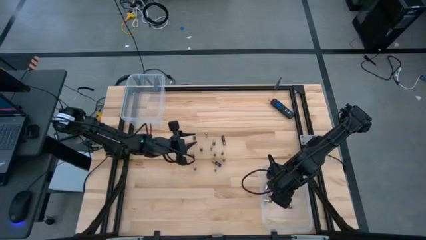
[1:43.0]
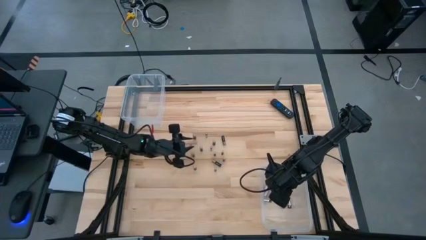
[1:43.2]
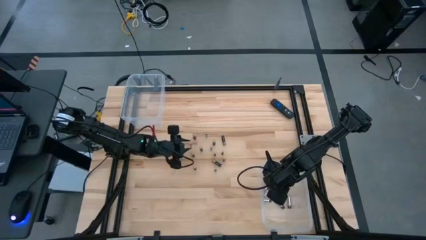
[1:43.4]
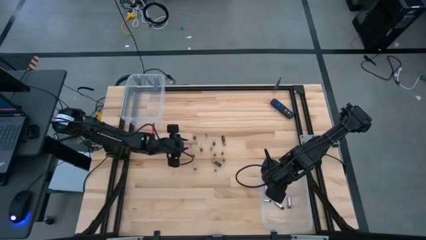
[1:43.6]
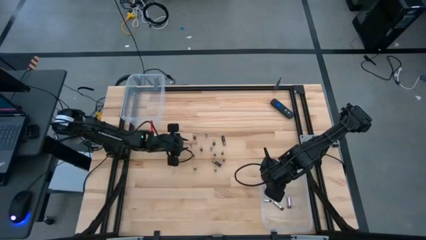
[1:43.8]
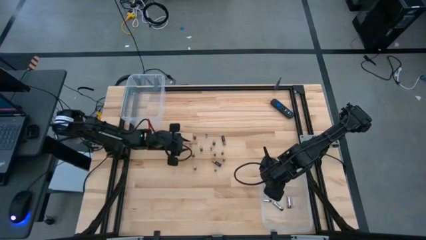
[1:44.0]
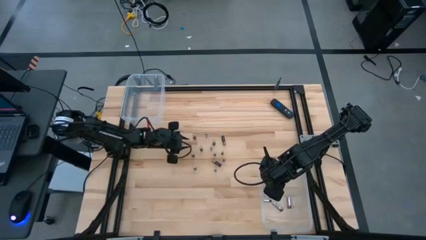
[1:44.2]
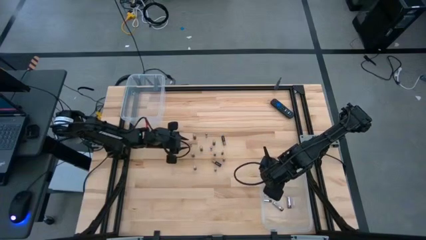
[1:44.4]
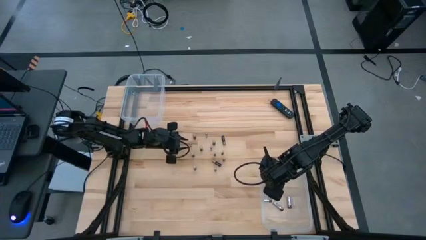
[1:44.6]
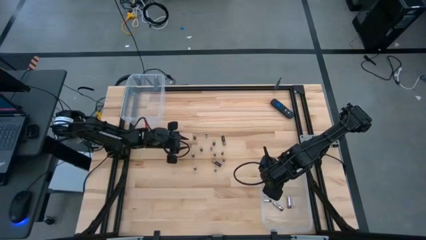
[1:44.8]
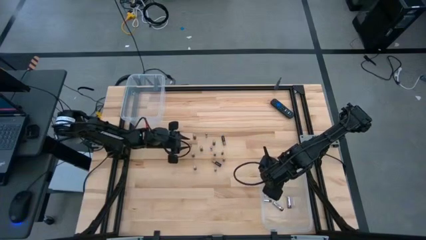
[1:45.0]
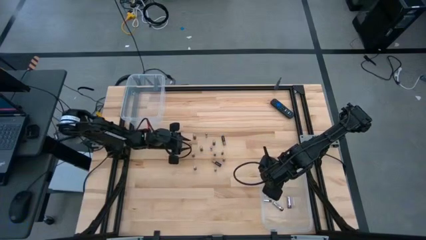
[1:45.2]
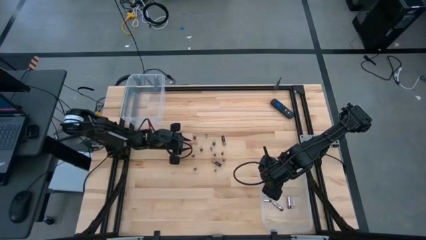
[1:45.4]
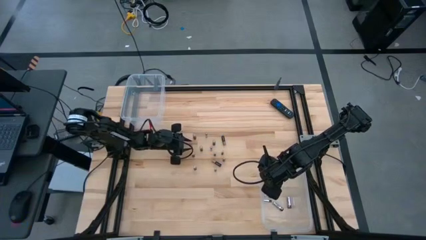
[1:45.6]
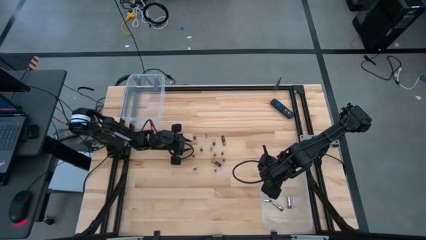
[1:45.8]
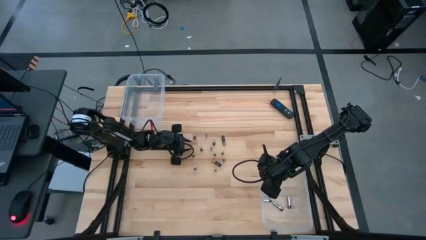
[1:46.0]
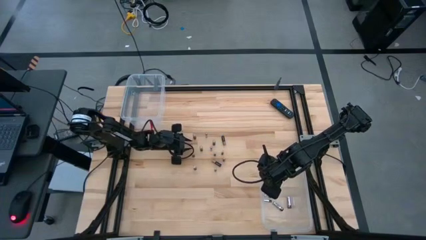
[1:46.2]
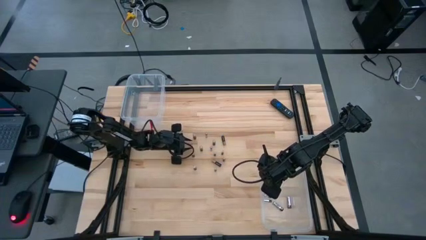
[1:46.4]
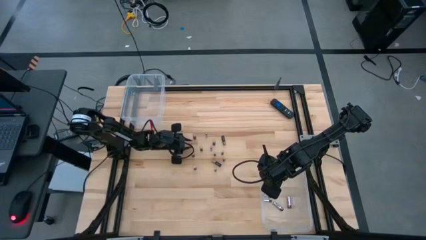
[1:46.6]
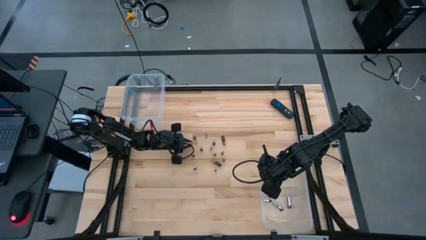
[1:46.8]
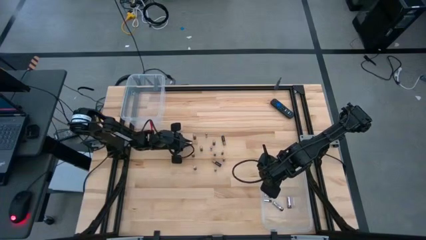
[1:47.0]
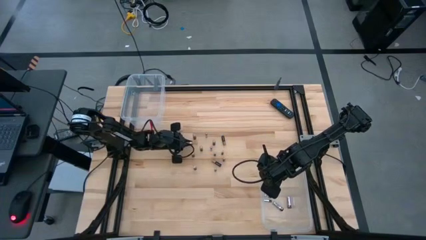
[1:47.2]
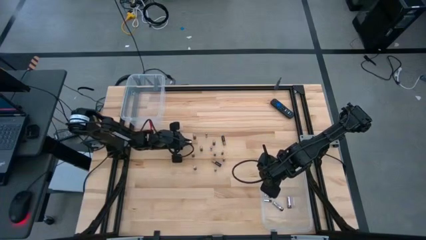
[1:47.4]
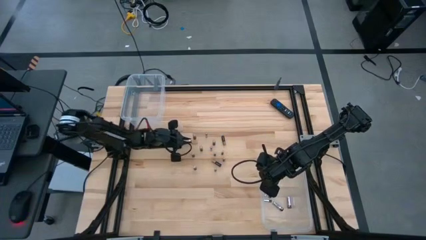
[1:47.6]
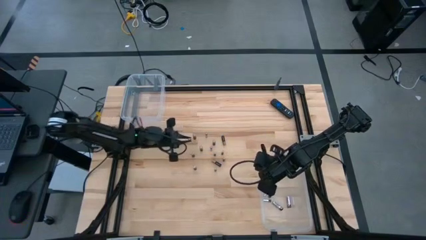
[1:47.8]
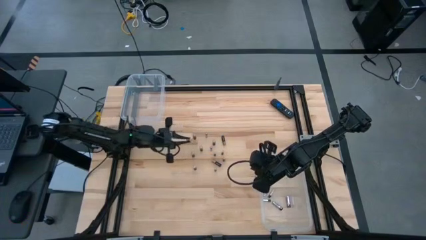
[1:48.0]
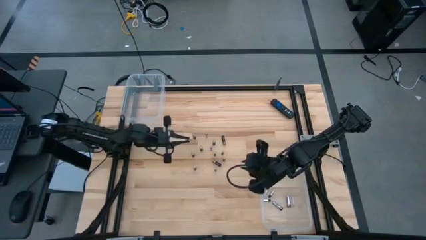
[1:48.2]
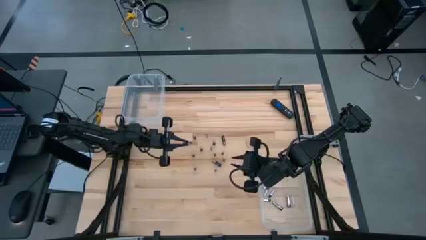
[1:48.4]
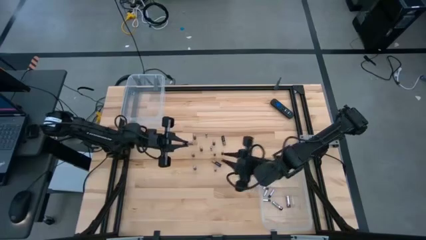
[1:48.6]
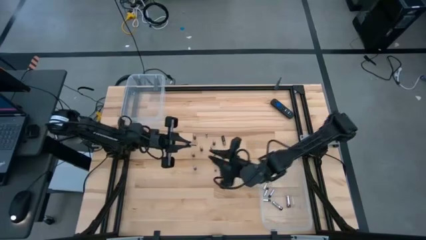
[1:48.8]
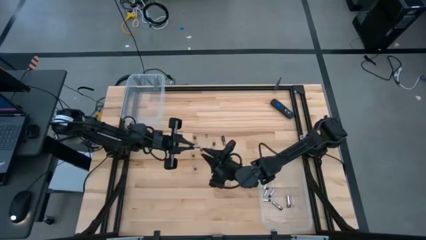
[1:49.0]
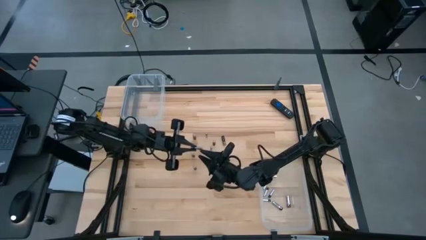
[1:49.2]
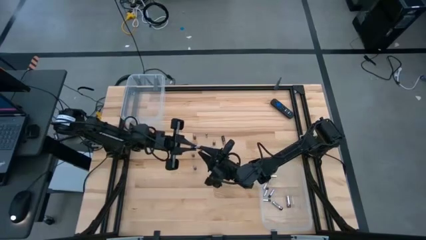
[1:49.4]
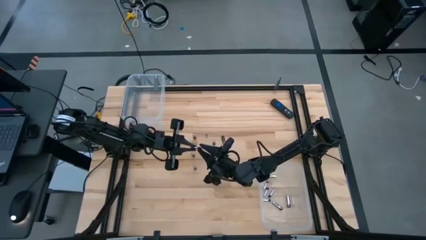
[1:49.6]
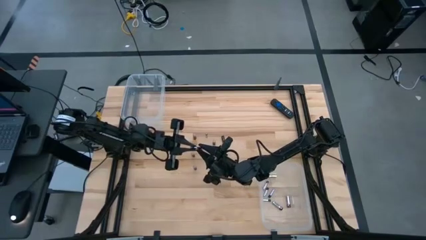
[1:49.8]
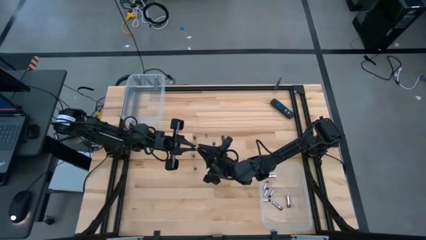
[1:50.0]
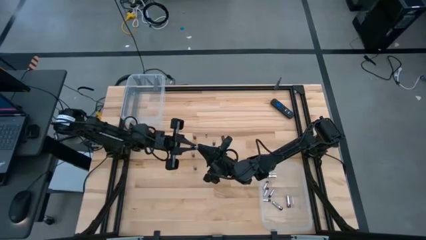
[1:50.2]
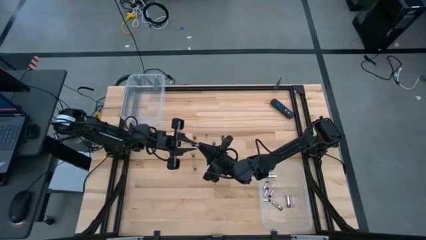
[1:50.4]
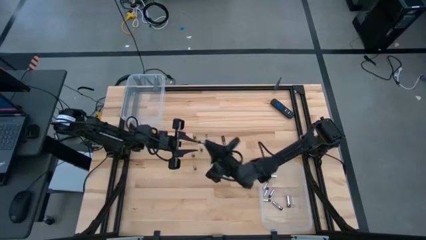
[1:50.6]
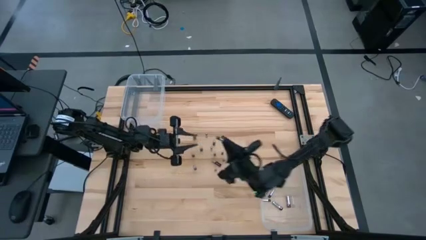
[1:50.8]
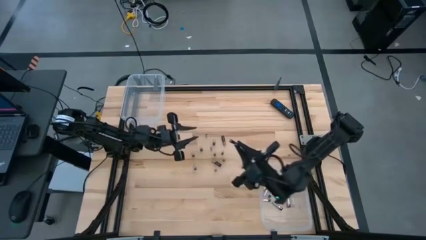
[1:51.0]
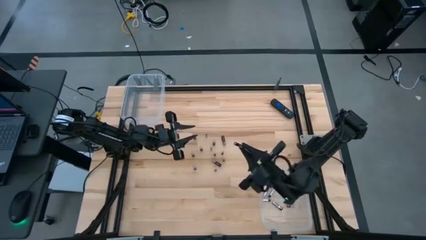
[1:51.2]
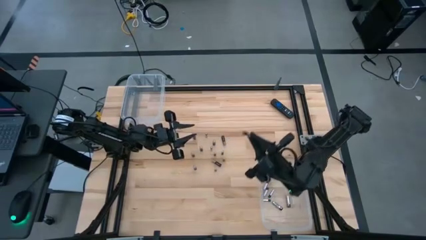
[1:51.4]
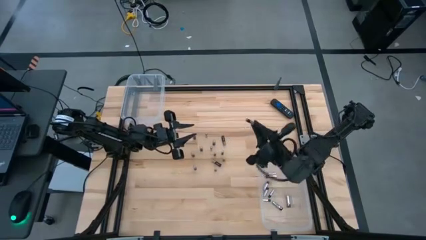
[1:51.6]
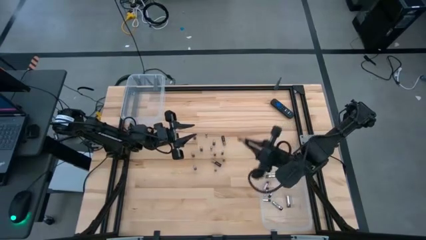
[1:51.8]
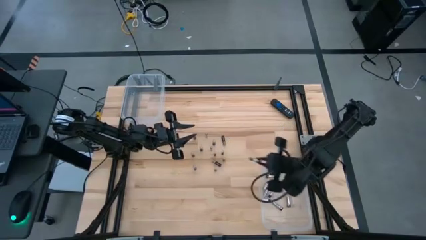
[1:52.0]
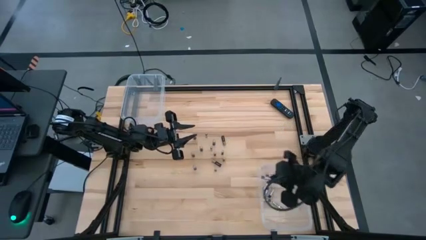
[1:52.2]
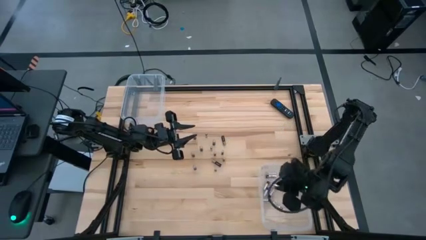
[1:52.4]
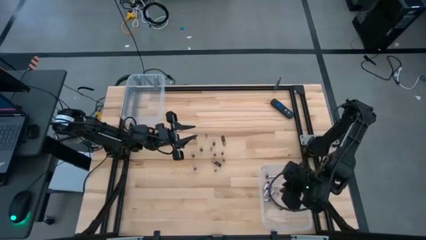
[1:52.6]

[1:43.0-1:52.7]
Task: Sort batteries
Put the black and silver battery into the bottom transparent bin

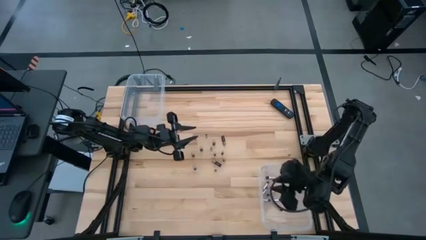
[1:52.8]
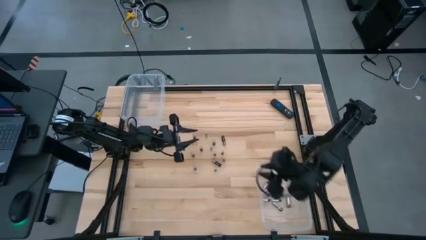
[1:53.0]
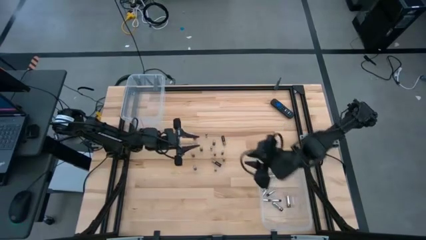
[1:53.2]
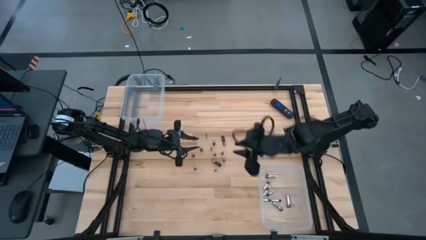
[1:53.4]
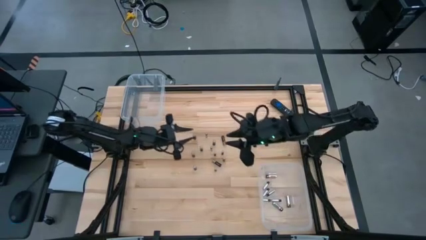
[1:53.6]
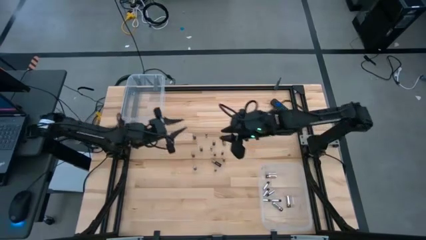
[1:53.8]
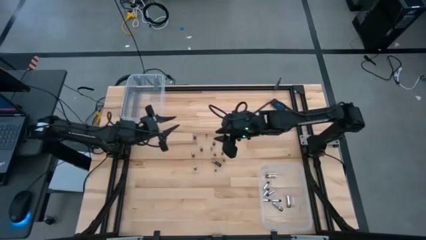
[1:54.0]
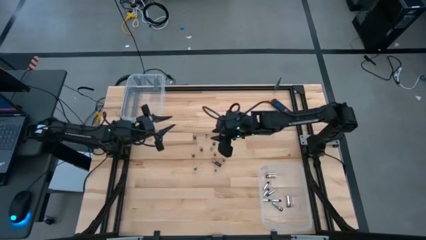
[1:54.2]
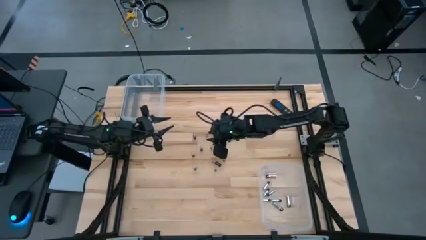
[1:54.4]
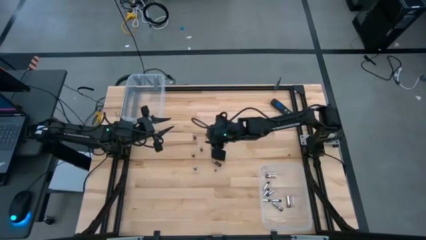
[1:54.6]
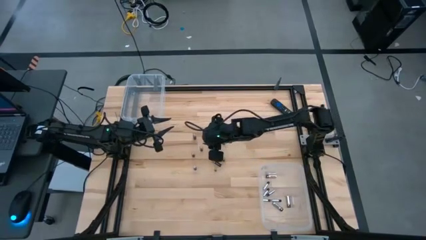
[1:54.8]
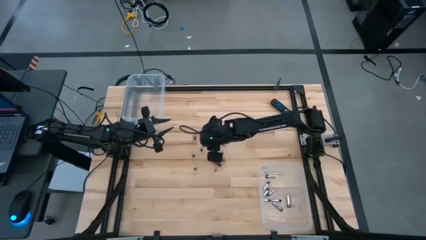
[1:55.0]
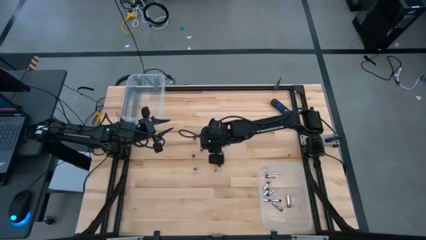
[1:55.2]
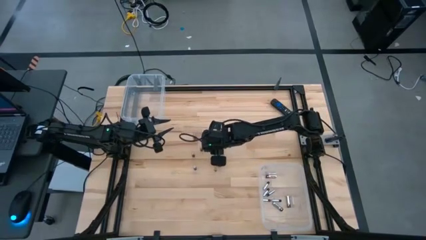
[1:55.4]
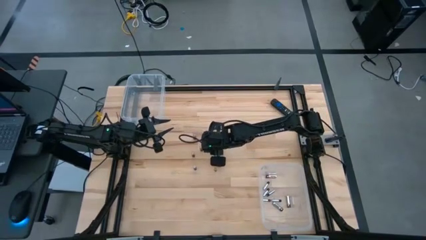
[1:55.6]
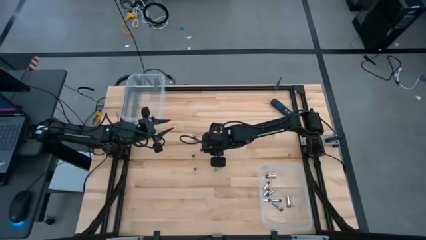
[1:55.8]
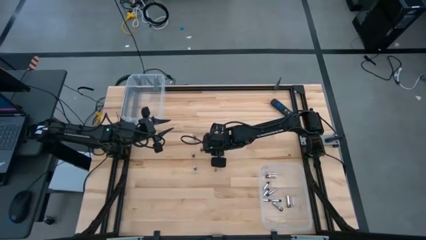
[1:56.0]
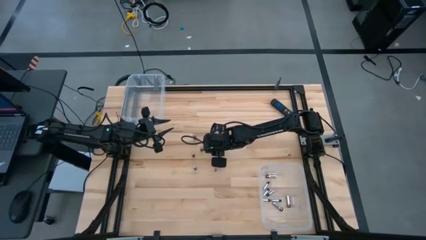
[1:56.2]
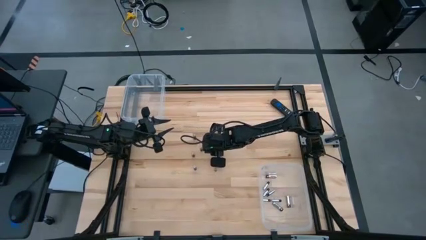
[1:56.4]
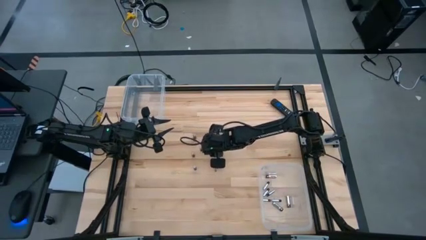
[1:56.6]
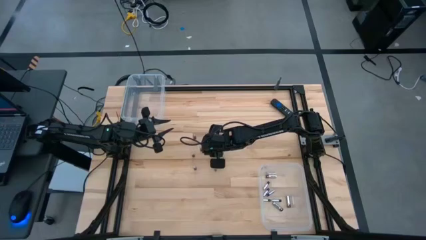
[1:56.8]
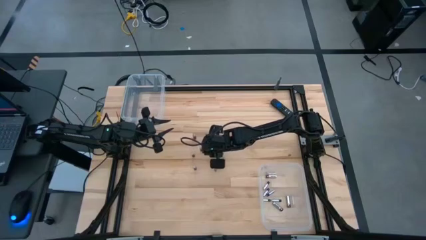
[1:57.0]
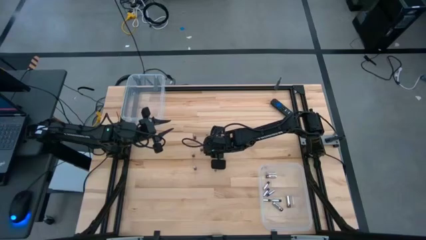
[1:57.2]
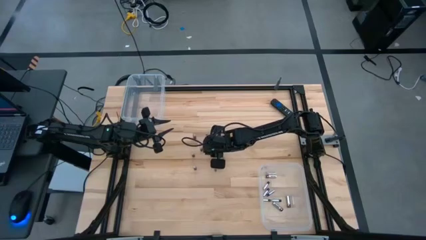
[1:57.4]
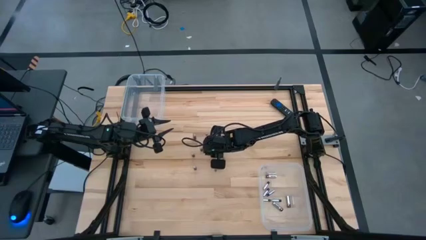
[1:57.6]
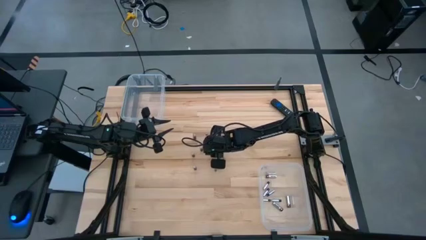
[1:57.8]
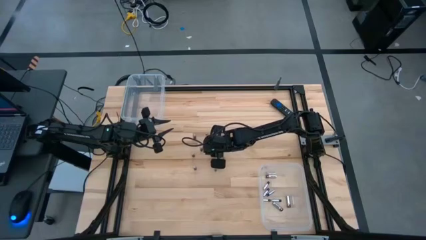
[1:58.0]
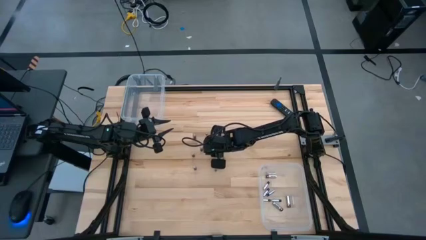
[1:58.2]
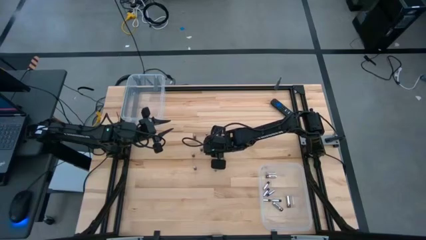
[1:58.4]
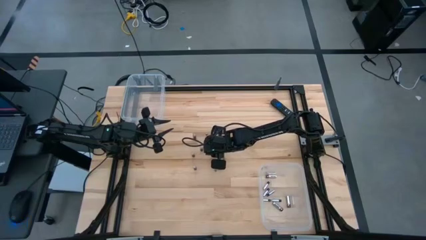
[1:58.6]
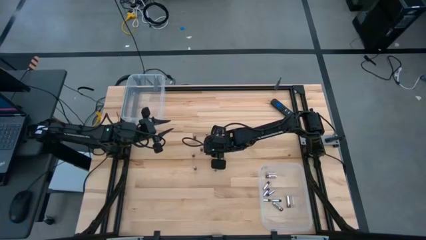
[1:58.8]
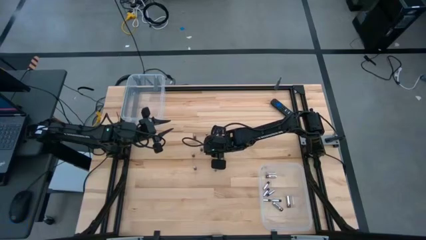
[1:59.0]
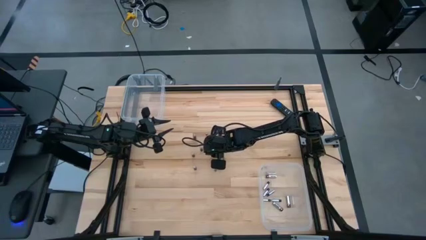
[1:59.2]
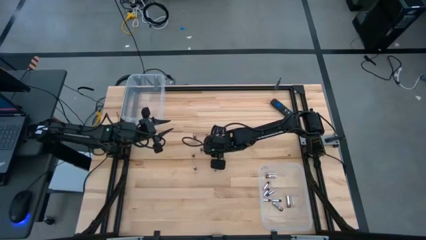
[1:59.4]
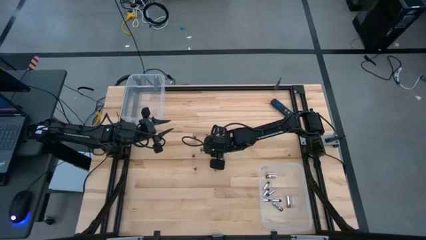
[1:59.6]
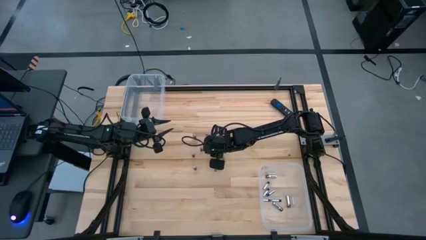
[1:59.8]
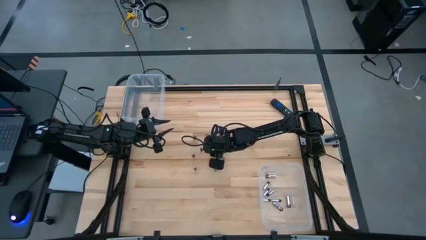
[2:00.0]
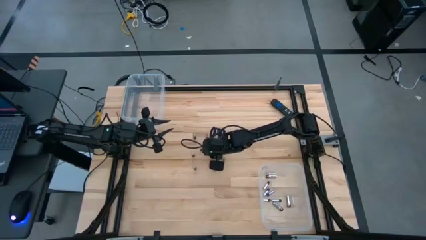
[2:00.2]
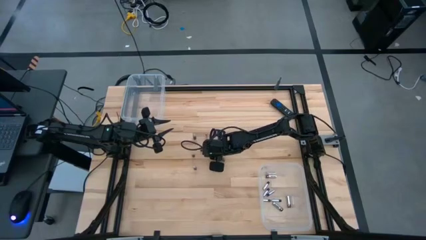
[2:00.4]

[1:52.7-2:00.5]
Put the black and silver battery into the bottom transparent bin
